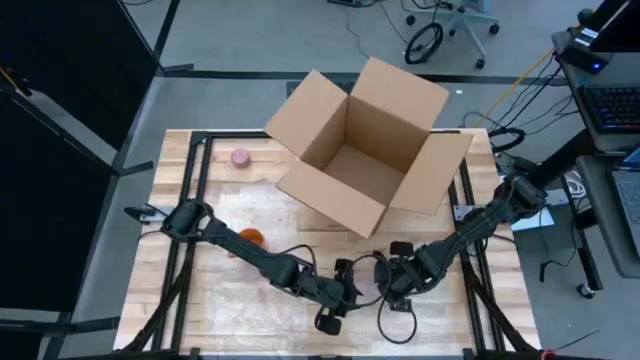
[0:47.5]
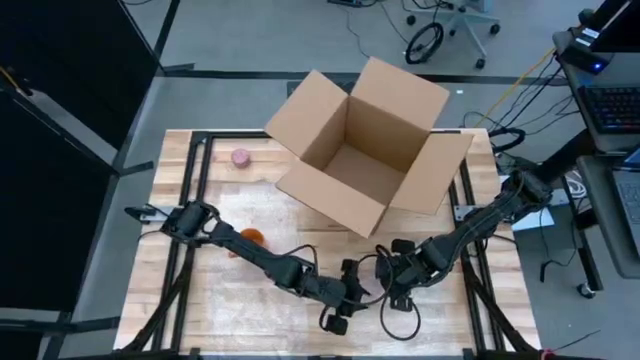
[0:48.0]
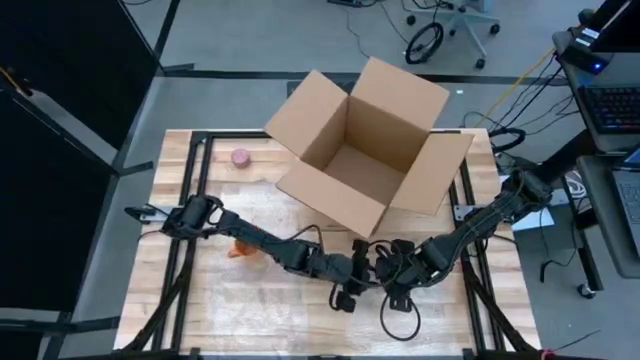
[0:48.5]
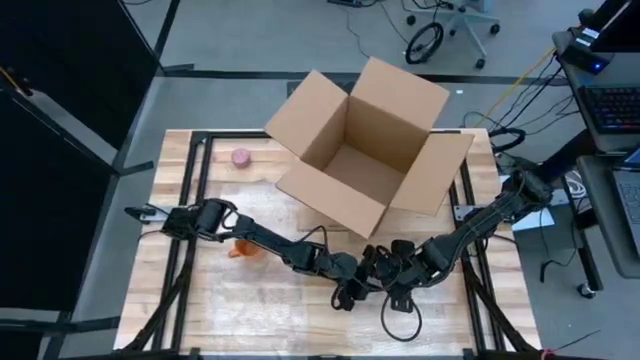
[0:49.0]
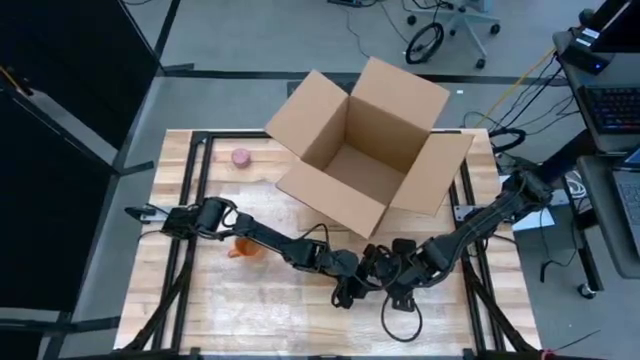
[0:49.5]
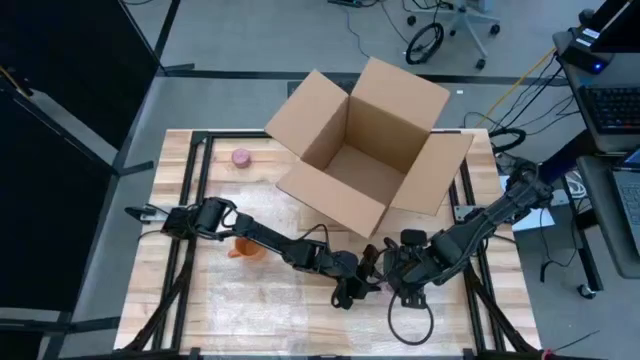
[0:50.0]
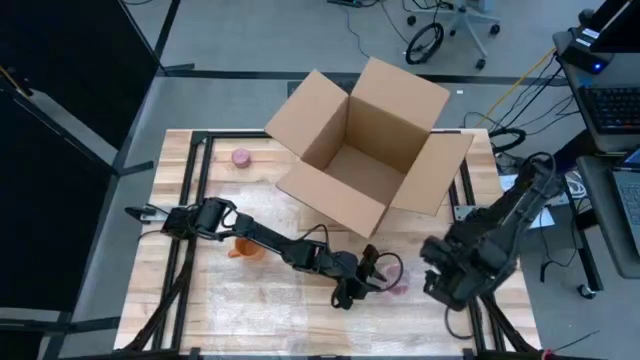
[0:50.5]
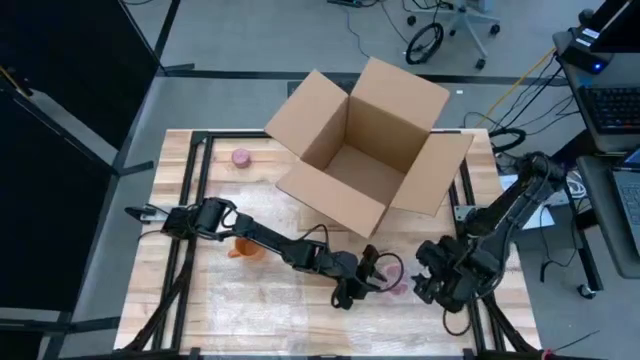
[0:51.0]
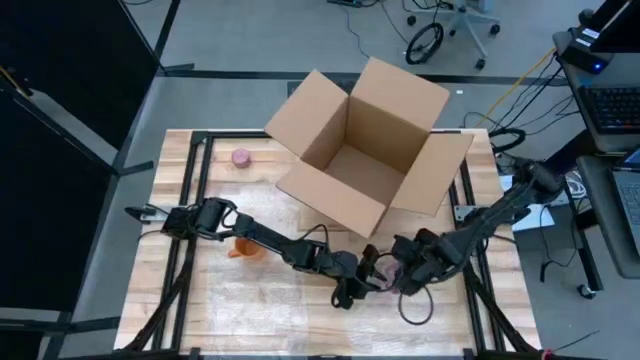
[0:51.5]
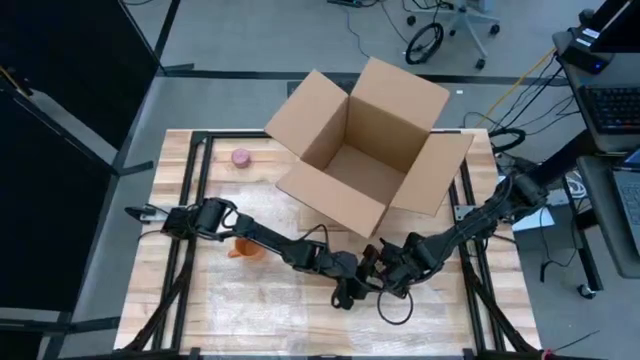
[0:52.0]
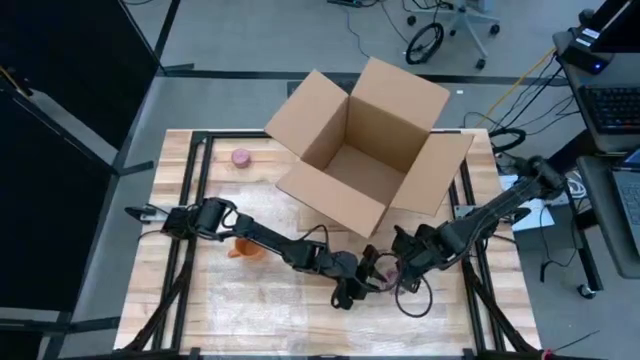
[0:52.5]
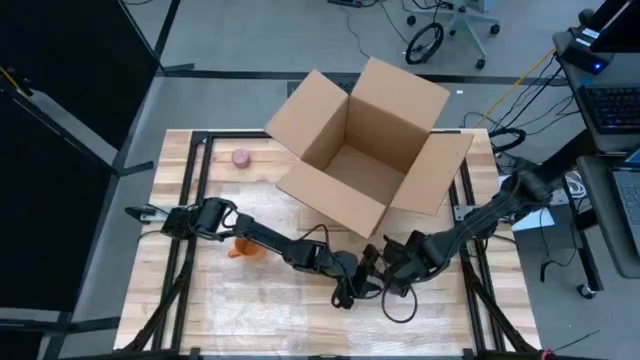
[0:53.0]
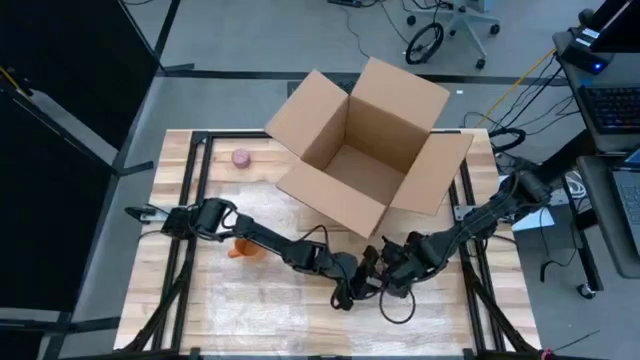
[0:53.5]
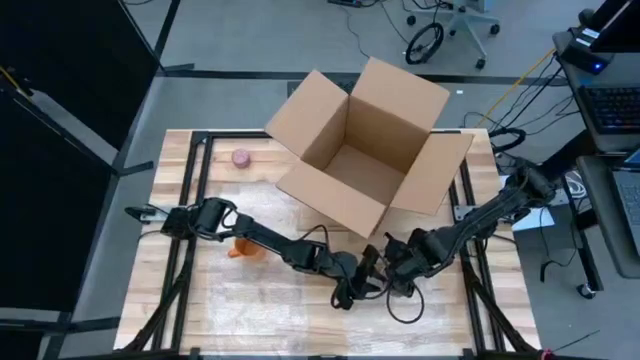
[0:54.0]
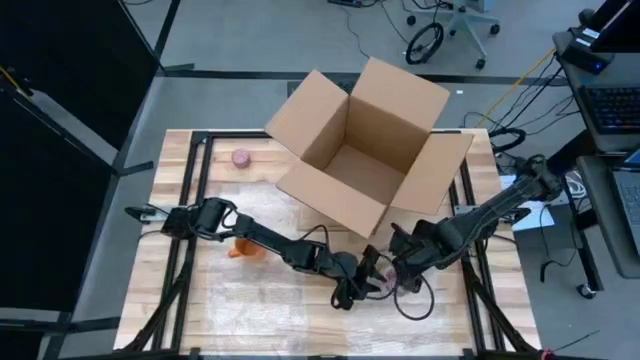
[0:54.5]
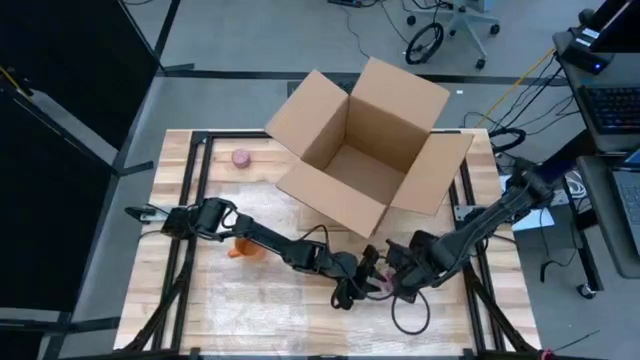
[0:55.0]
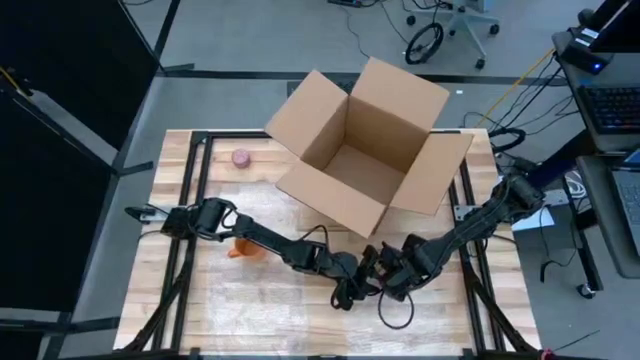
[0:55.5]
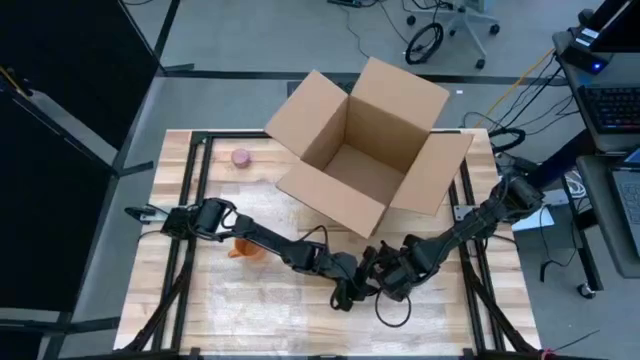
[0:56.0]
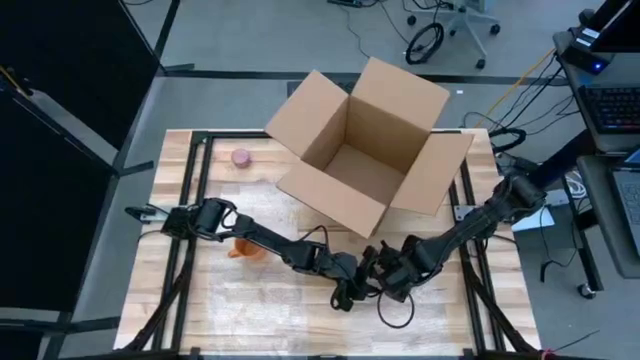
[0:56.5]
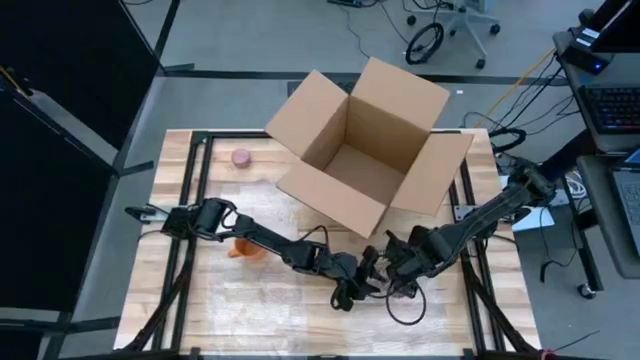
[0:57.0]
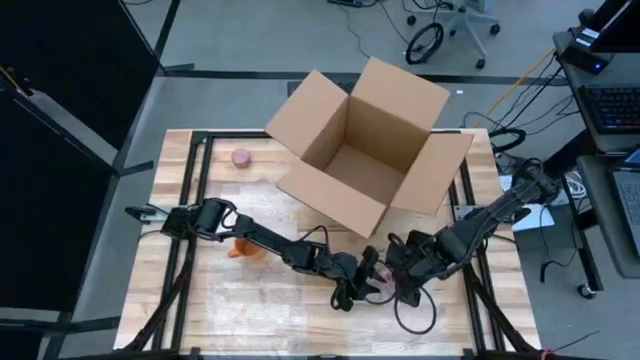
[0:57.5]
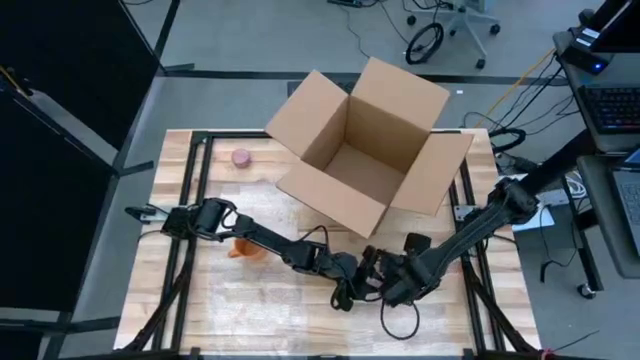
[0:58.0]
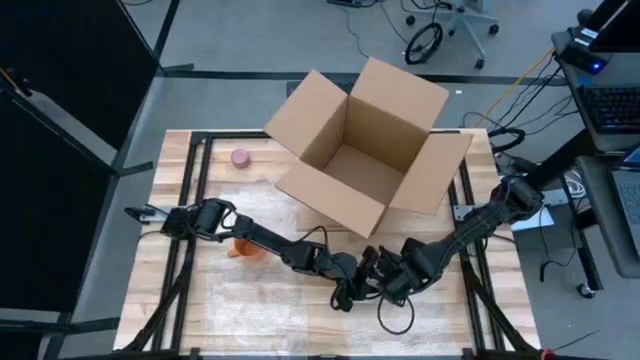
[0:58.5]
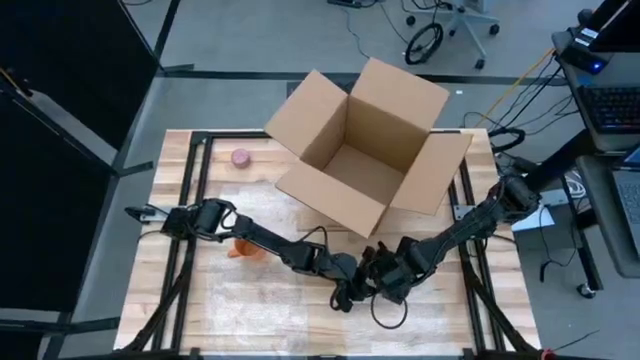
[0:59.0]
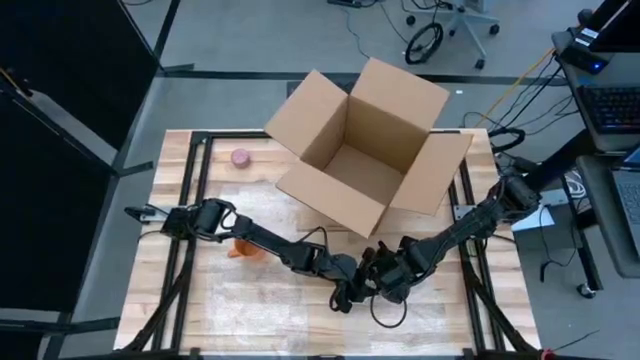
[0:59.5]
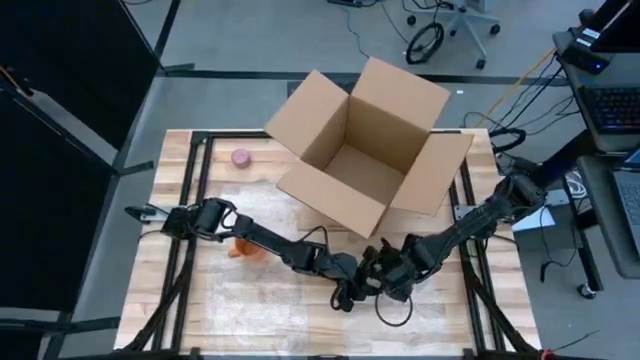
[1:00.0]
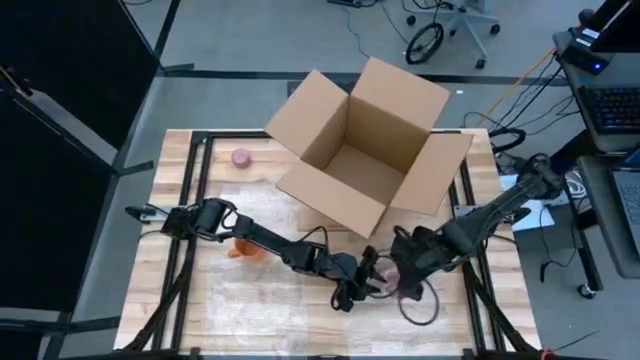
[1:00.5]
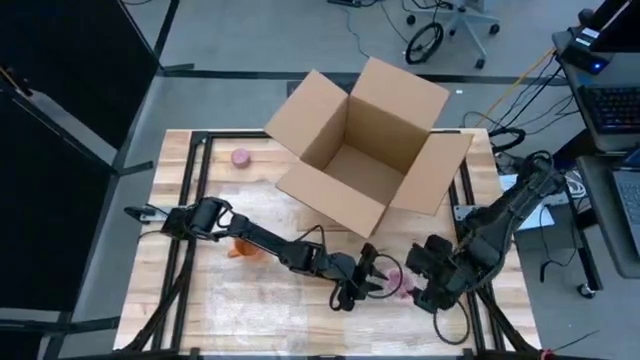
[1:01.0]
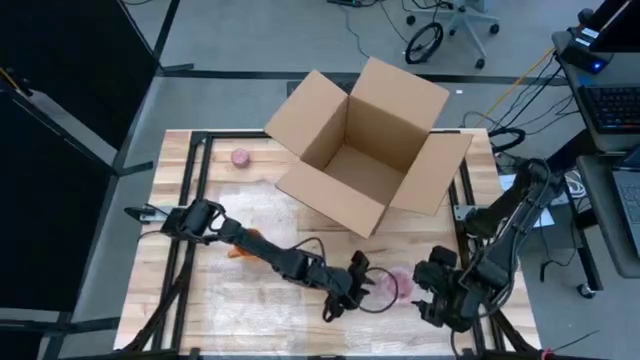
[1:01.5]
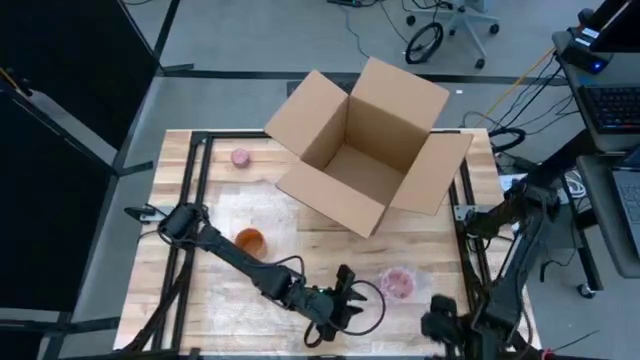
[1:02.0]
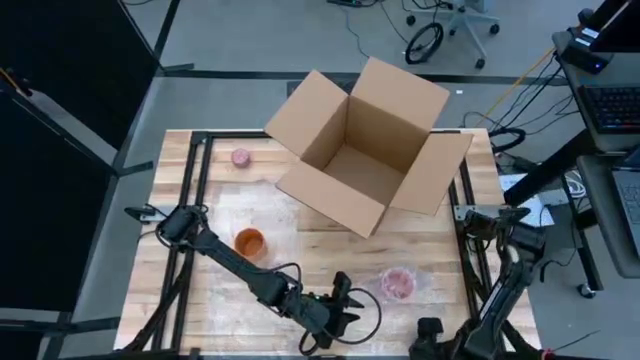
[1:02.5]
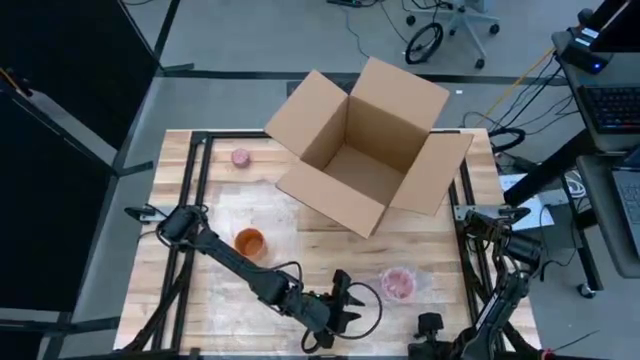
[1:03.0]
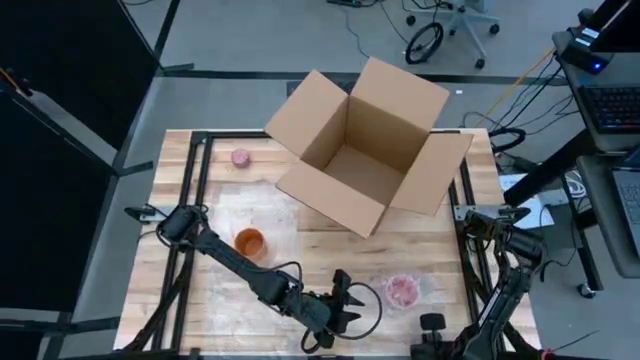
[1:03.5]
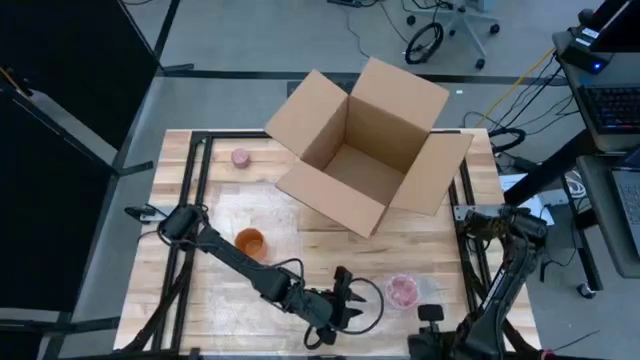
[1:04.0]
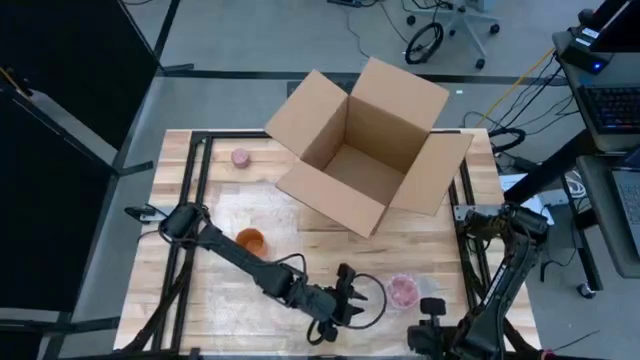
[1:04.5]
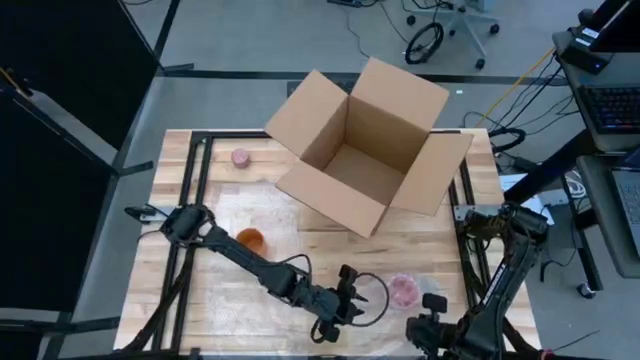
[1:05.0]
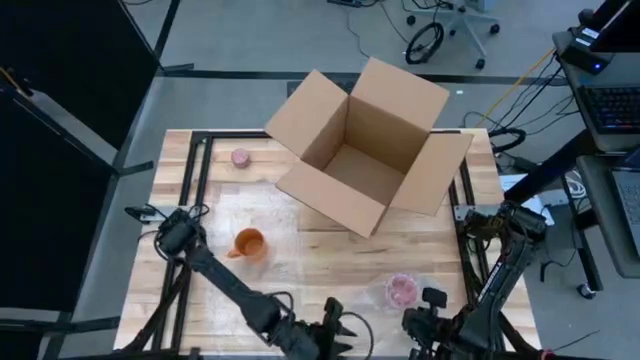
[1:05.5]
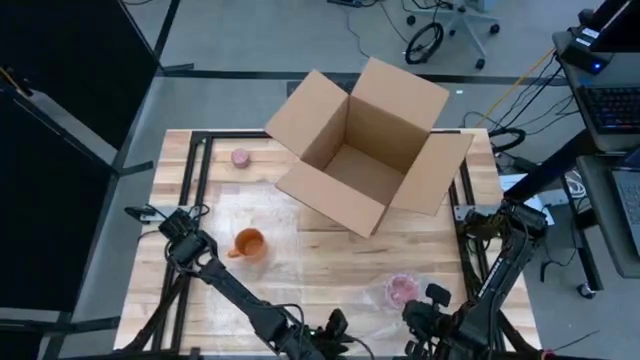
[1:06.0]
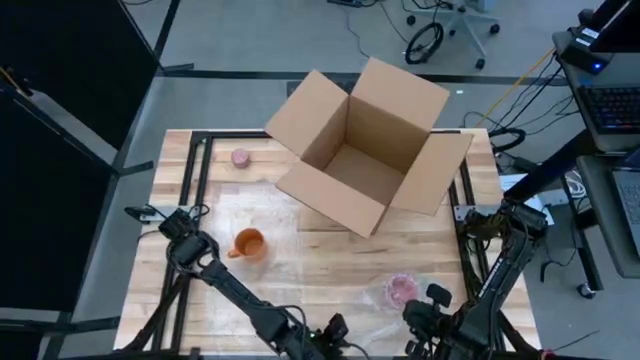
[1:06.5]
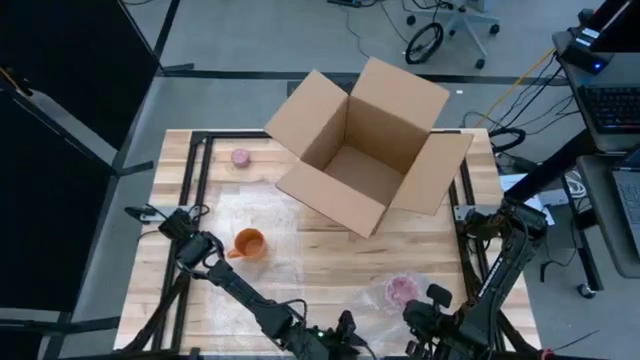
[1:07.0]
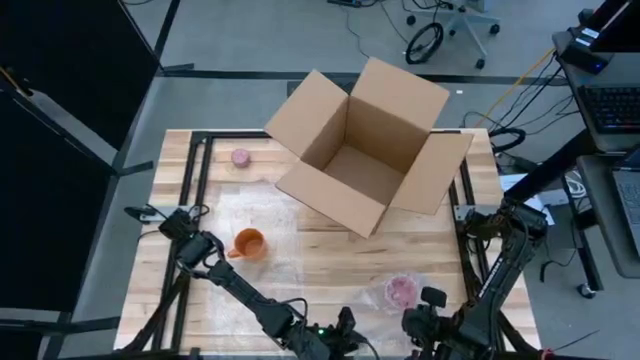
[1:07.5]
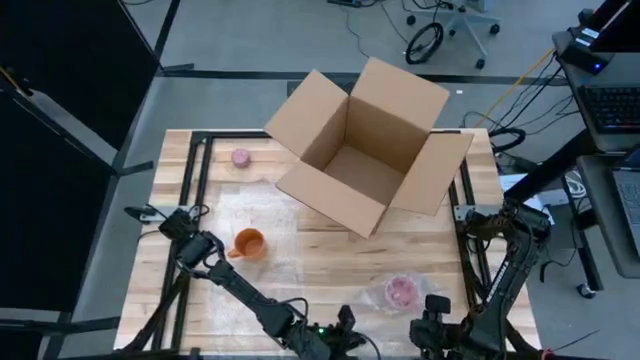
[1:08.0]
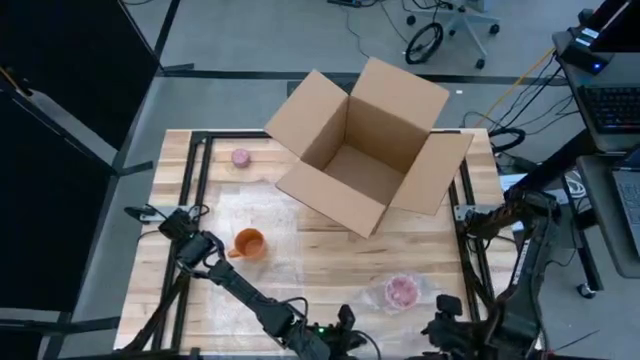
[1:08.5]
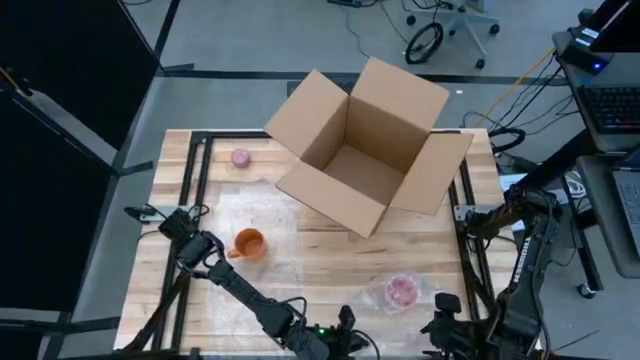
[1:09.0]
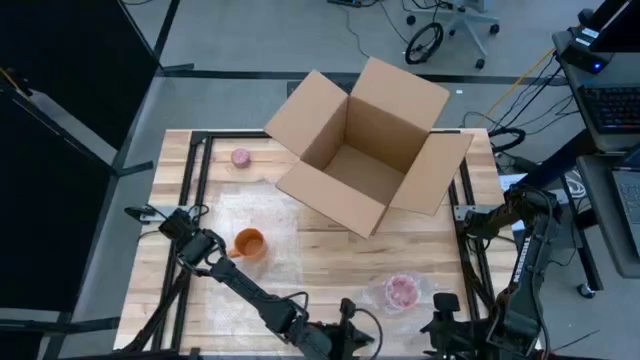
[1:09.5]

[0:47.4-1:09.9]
Task: wrap mug
Wrap the pink mug in the bubble wrap
